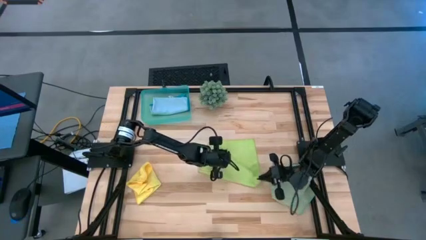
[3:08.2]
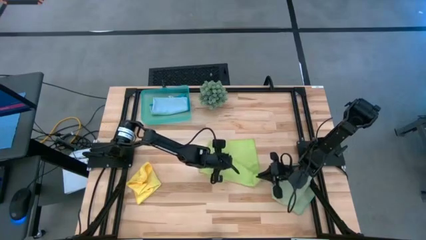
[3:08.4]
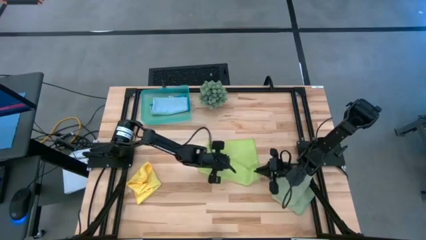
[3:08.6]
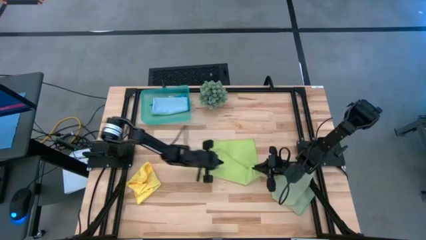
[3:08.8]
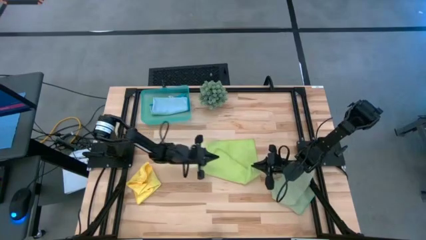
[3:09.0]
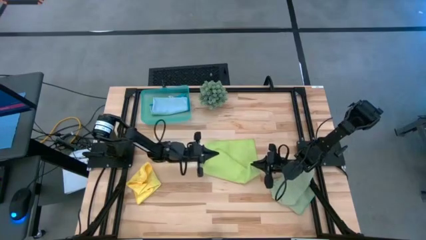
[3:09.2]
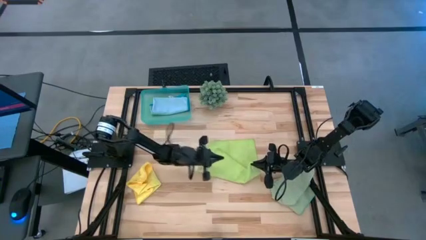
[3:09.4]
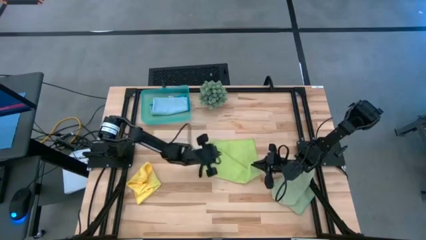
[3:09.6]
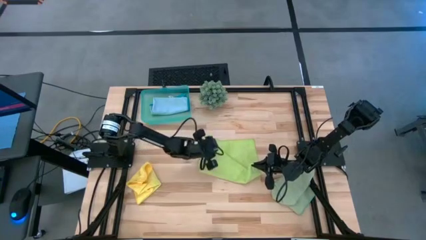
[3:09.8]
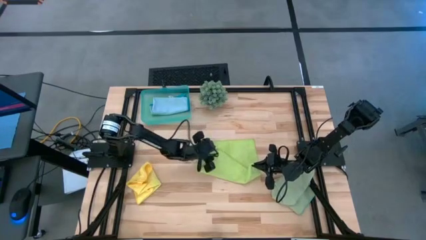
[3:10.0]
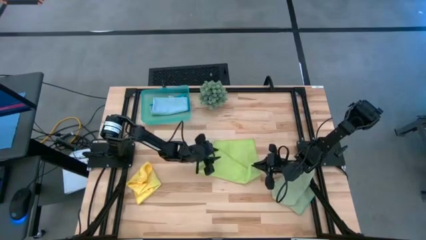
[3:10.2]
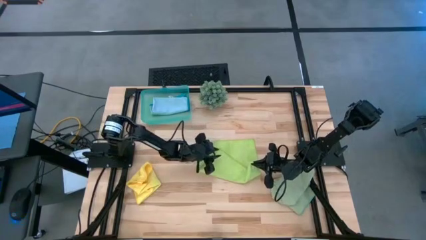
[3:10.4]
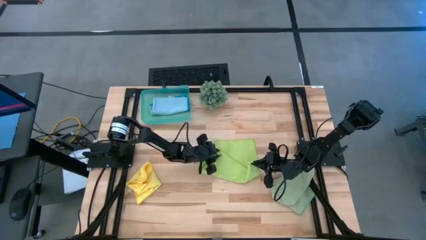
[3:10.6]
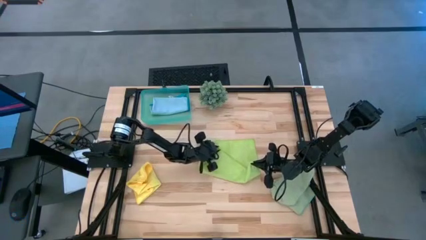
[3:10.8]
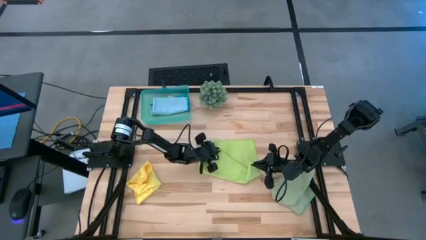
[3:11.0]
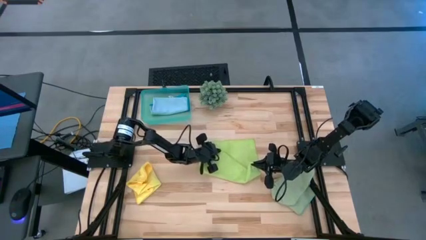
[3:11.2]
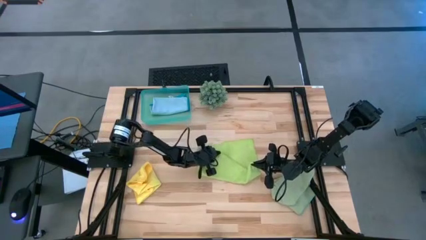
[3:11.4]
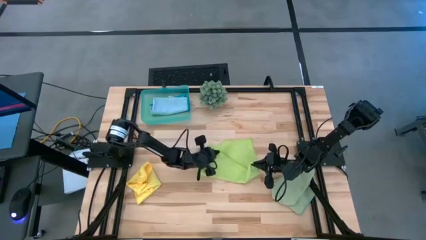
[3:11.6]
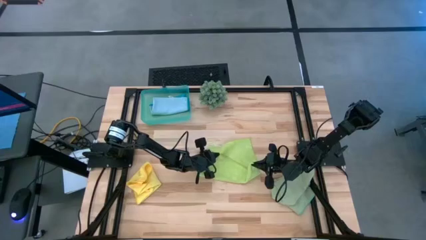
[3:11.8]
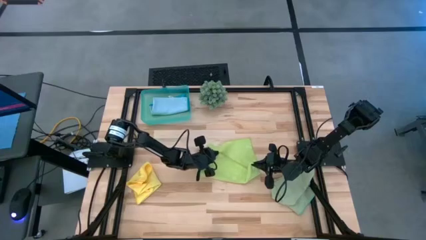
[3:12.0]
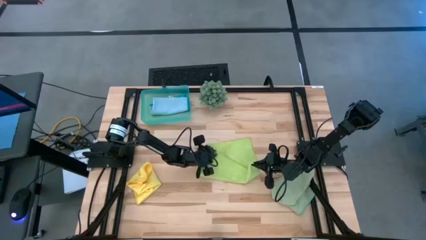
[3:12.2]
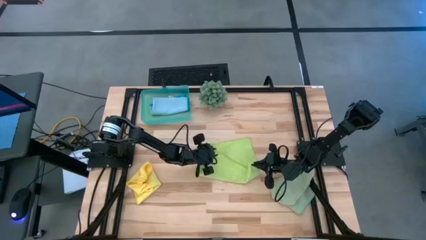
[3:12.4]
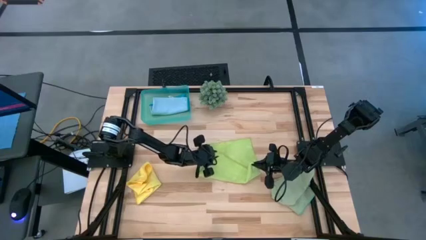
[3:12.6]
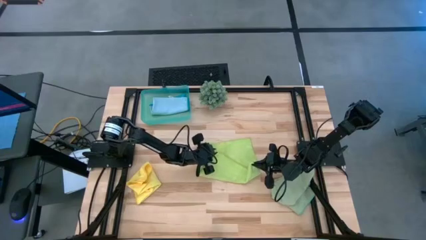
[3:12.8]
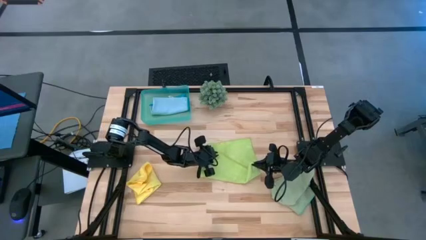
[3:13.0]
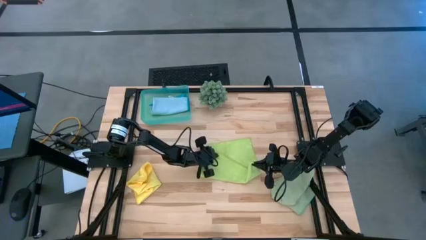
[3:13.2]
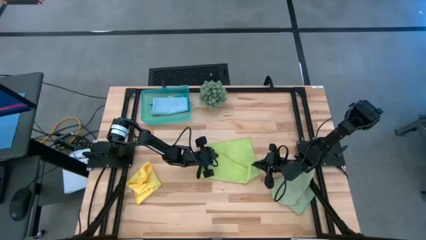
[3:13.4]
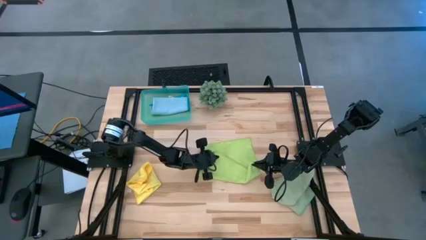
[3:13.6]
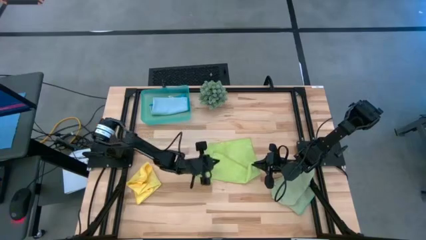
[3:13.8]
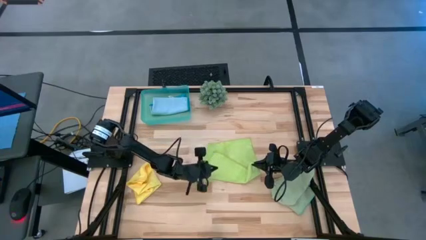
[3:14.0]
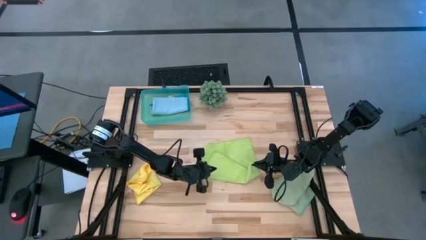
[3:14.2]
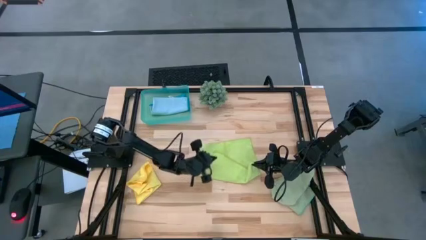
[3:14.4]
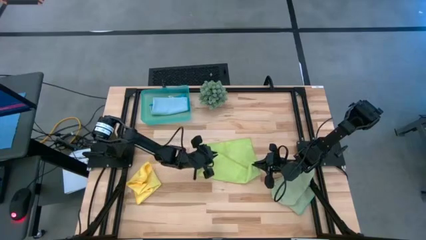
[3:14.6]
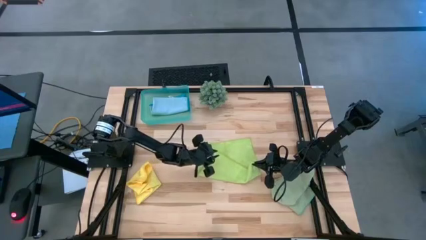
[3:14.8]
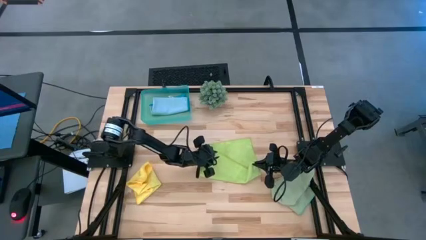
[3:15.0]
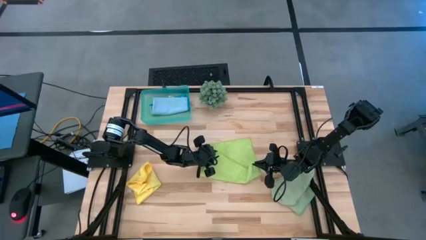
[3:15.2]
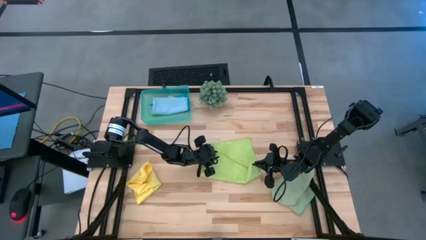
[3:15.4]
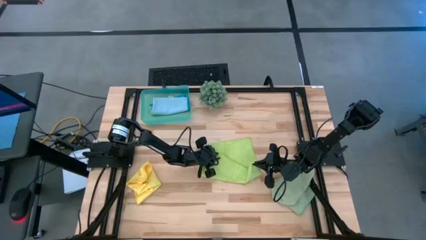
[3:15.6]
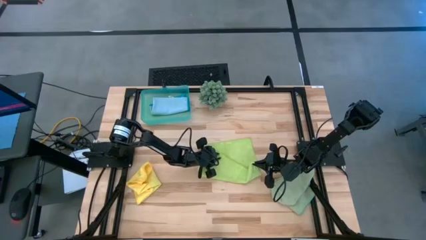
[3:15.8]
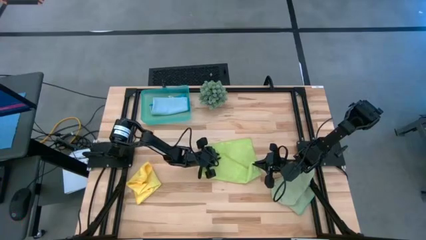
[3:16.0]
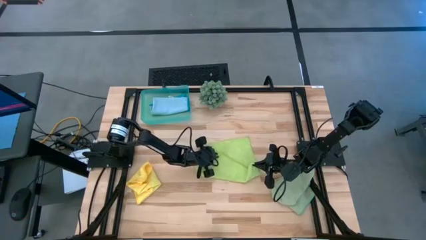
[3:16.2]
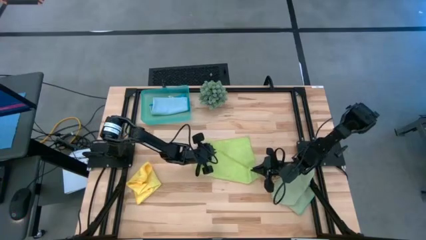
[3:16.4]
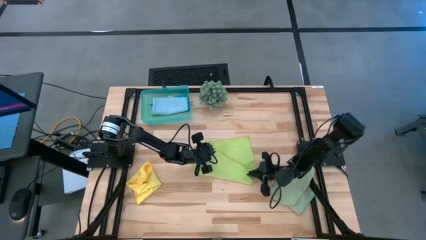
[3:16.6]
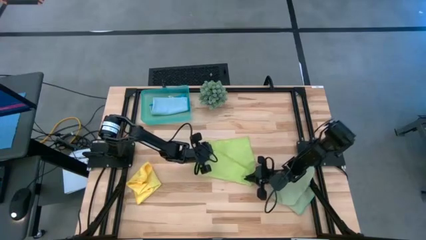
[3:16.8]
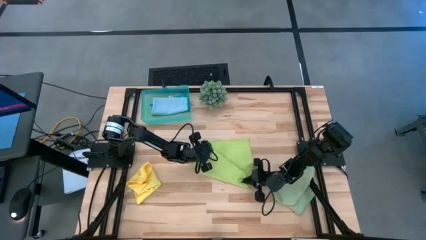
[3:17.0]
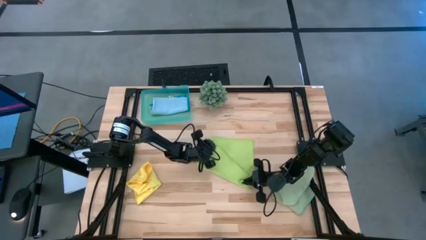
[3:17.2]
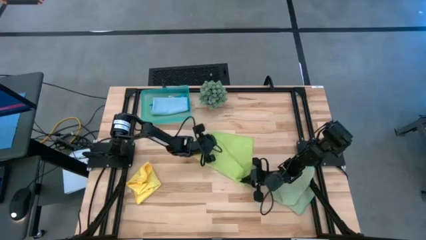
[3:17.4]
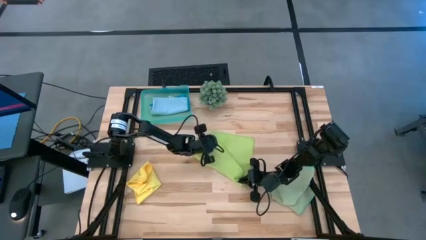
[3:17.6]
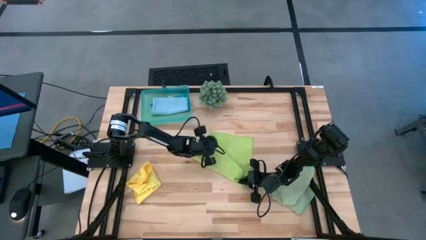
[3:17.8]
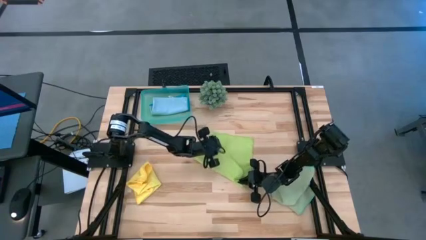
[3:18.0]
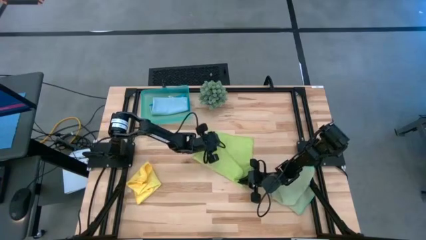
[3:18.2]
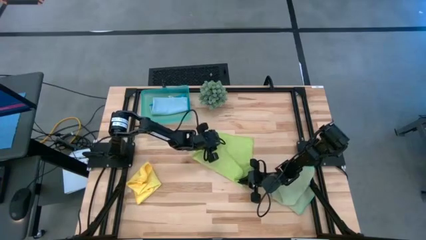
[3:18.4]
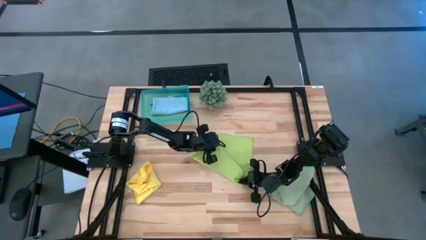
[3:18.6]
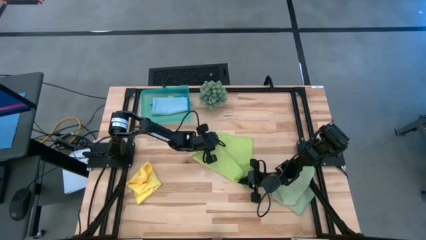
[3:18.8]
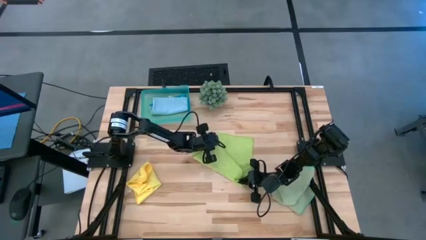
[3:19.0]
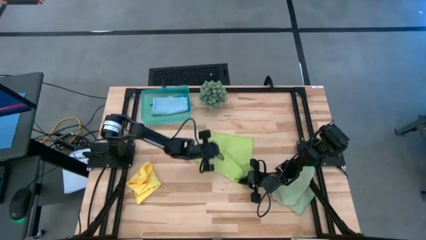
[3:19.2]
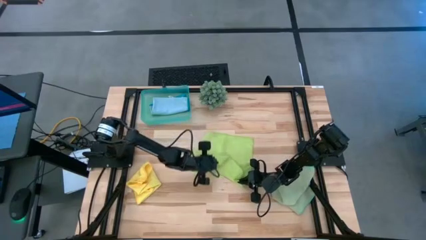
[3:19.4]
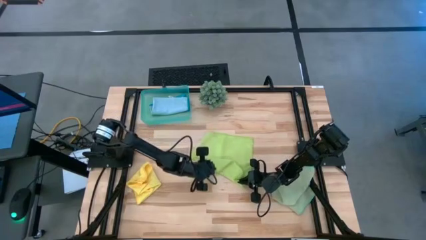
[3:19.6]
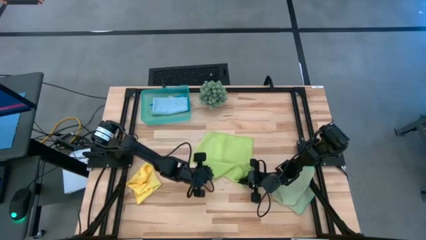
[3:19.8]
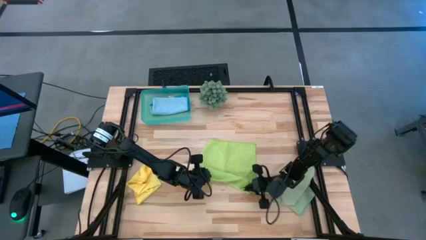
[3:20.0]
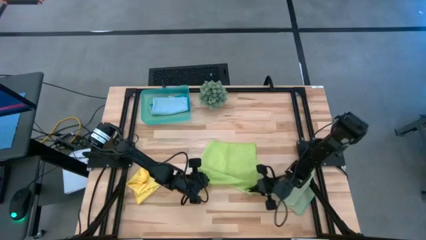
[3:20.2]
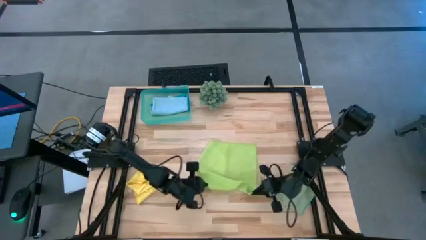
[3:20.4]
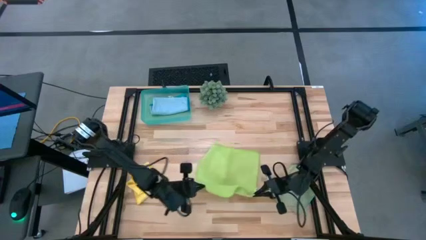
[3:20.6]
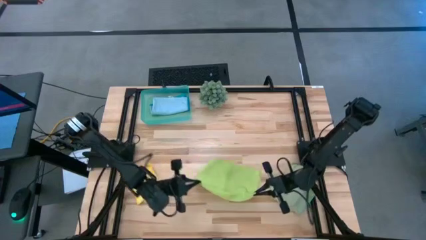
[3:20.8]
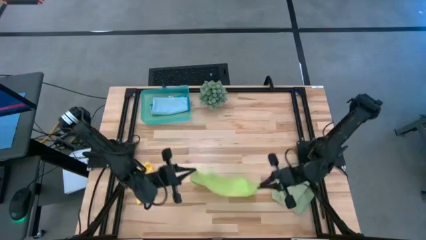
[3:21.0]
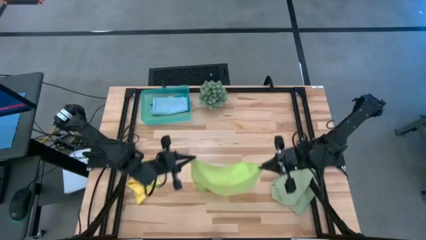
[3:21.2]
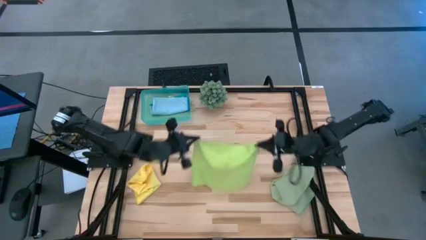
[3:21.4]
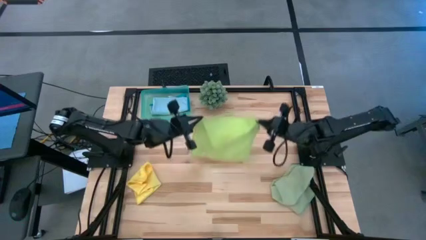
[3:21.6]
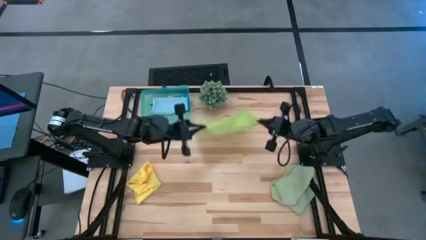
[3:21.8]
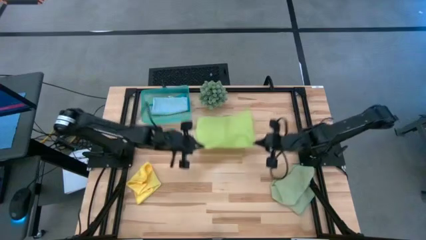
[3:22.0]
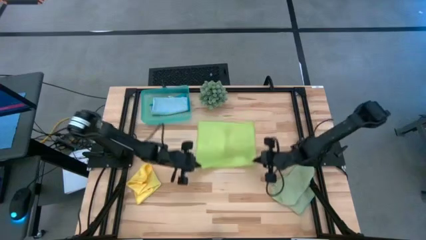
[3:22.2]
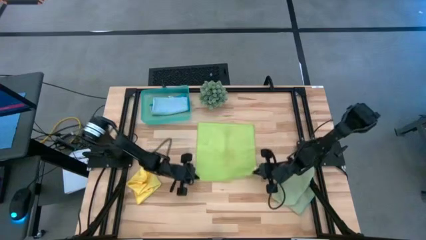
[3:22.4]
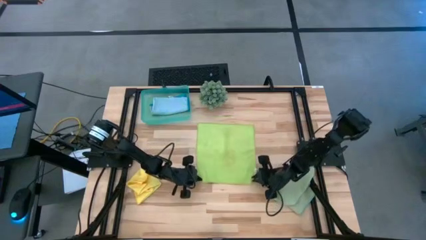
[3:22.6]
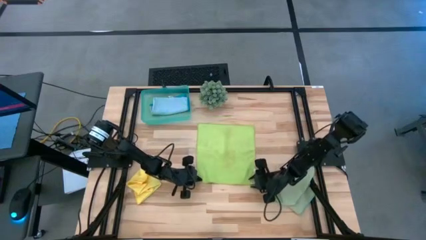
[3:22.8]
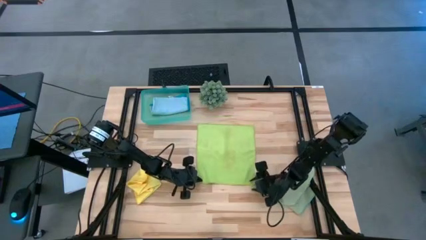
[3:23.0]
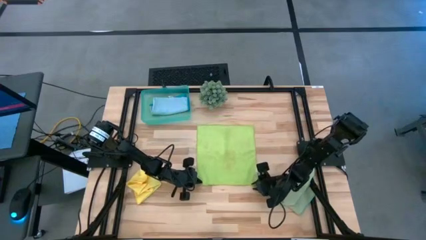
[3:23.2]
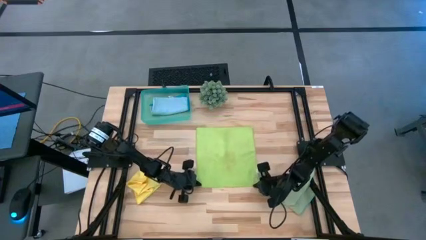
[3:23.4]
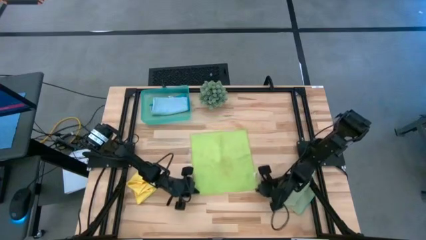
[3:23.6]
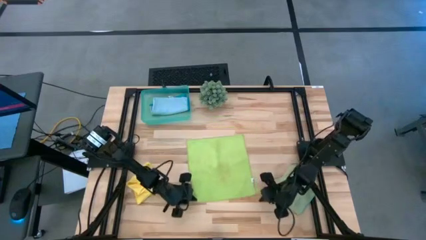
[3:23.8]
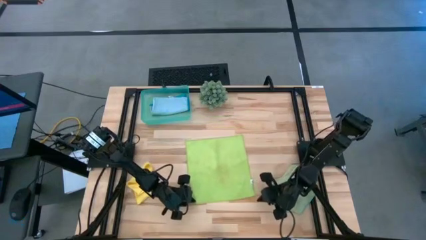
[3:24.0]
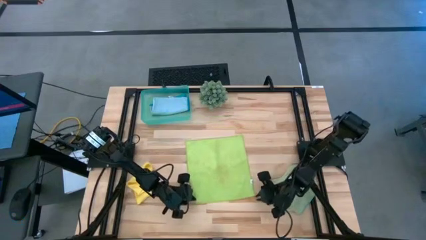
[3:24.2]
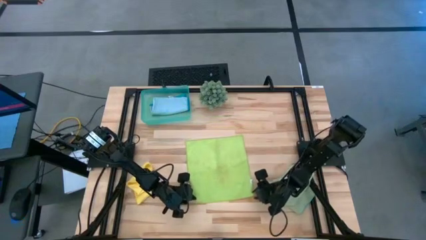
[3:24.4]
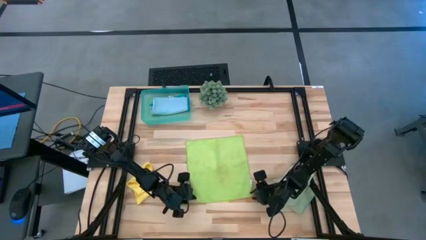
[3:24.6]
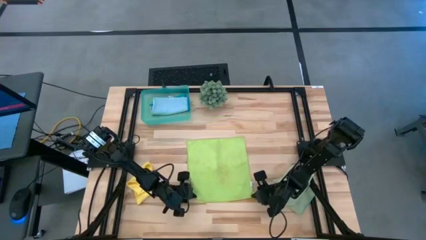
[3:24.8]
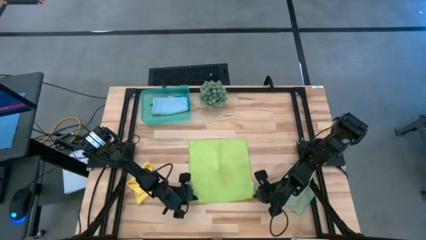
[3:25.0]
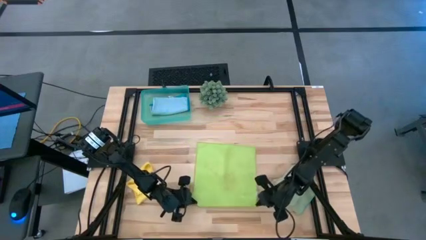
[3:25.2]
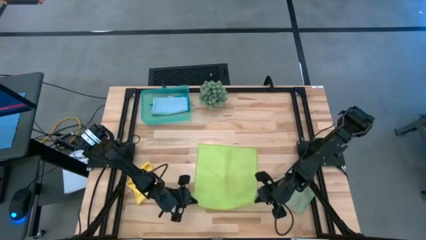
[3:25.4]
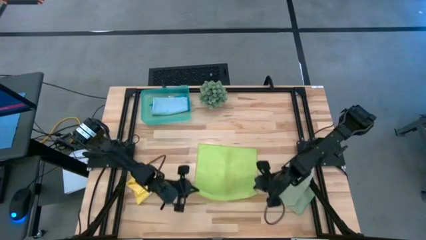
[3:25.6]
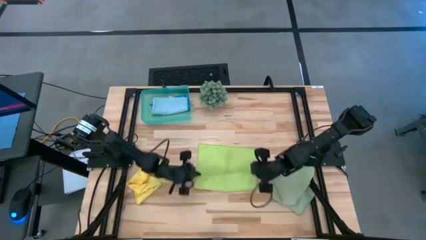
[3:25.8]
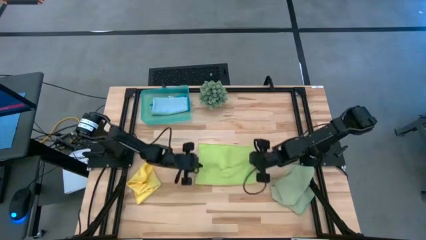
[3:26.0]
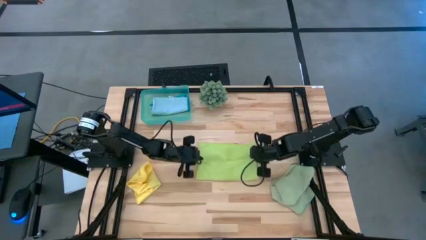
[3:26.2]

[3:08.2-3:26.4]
Task: Fold microfiber towels
Fold the light green microfiber cloth
